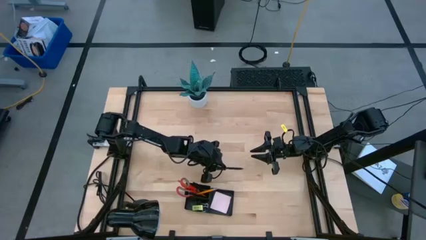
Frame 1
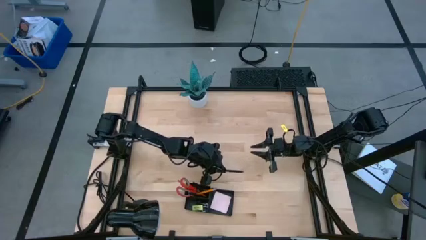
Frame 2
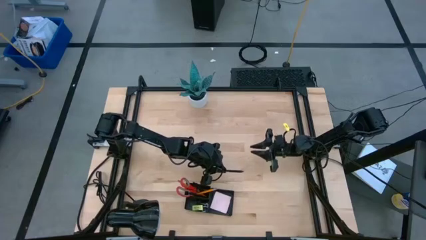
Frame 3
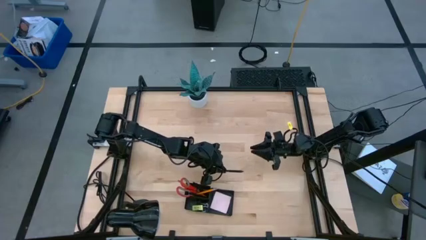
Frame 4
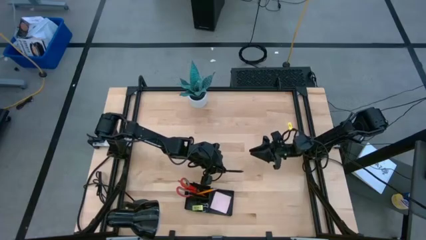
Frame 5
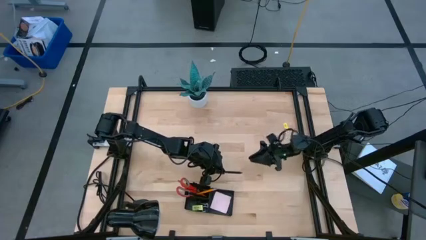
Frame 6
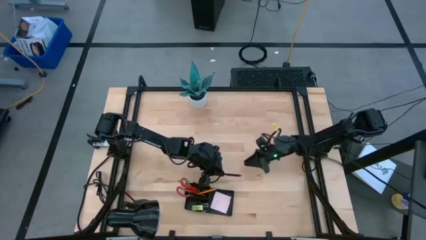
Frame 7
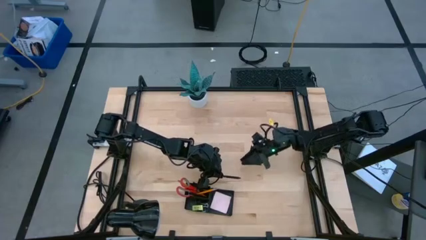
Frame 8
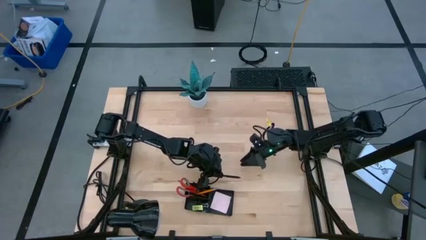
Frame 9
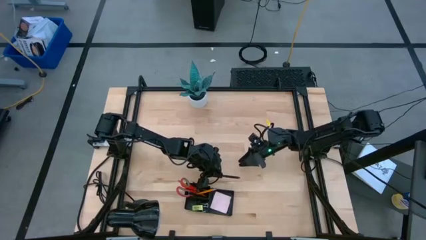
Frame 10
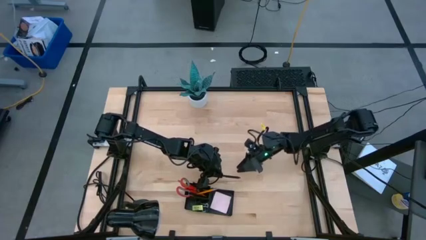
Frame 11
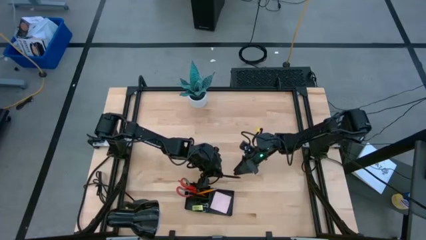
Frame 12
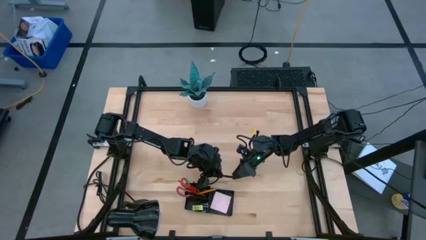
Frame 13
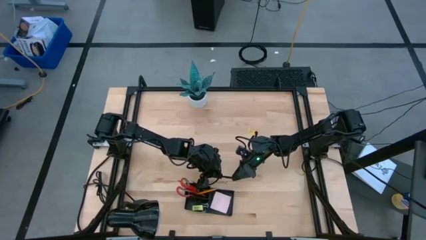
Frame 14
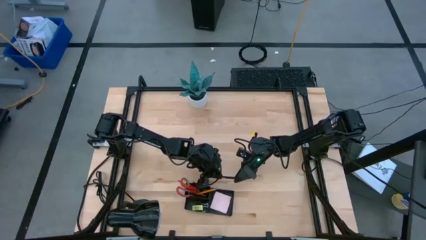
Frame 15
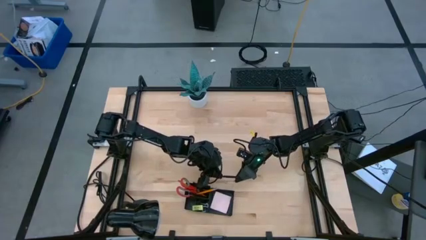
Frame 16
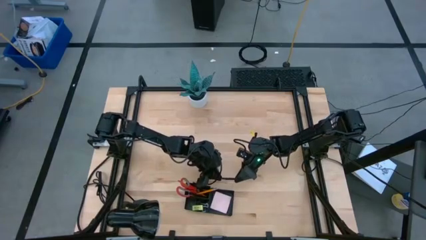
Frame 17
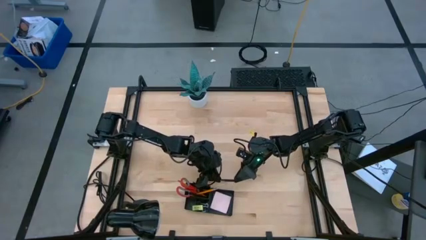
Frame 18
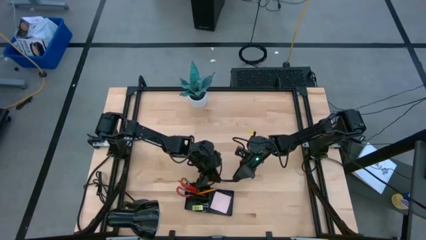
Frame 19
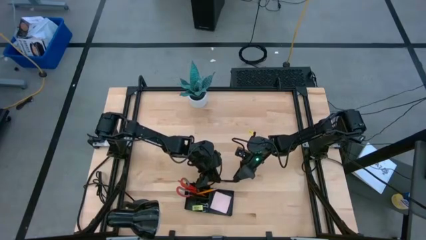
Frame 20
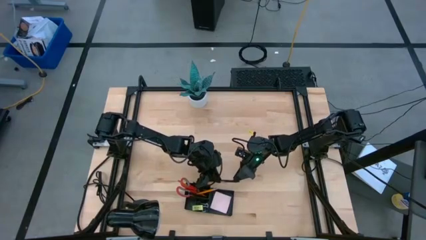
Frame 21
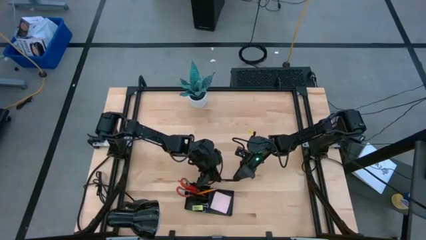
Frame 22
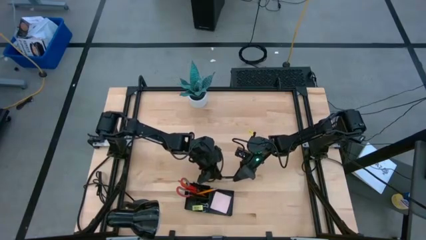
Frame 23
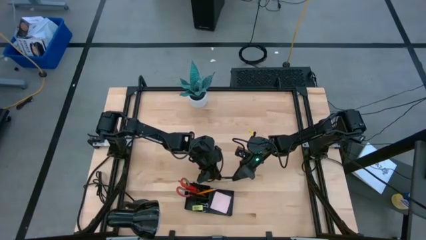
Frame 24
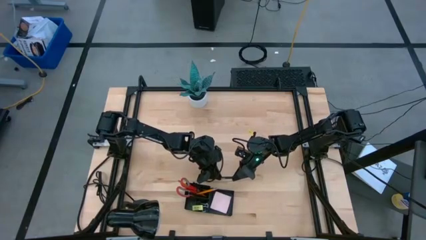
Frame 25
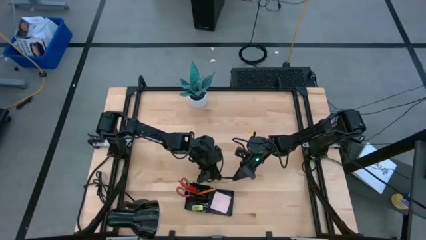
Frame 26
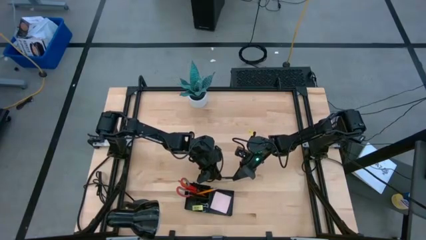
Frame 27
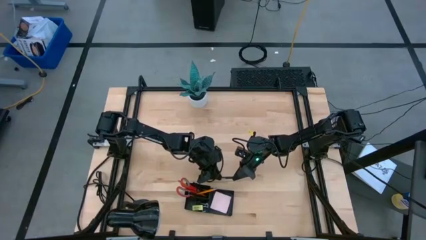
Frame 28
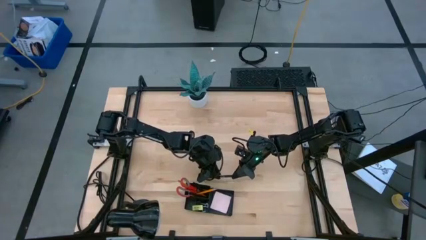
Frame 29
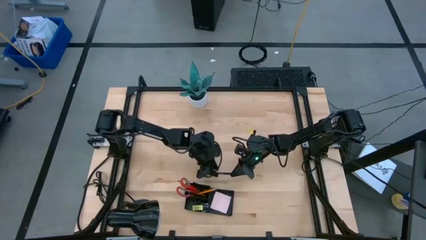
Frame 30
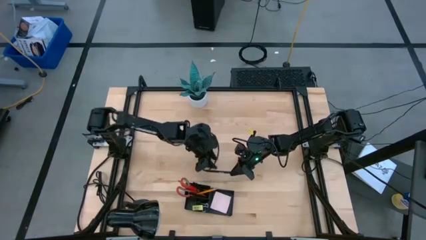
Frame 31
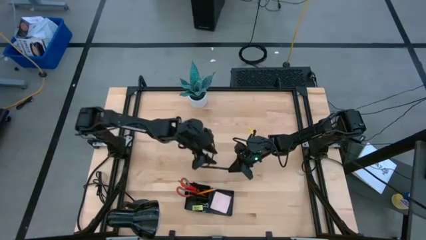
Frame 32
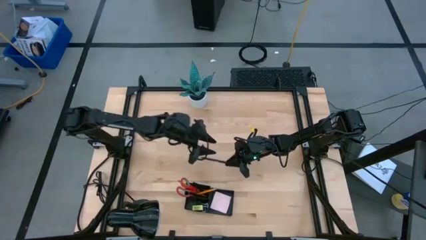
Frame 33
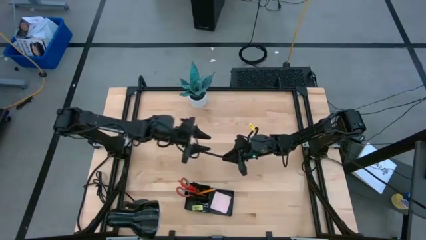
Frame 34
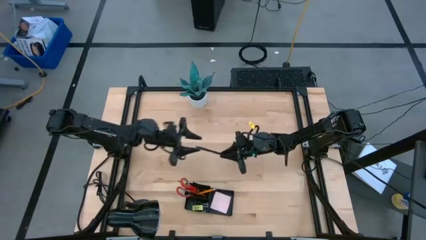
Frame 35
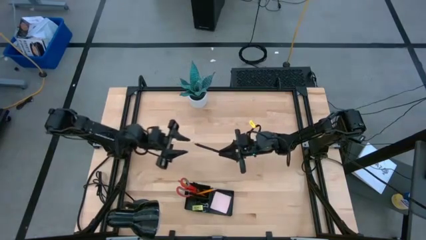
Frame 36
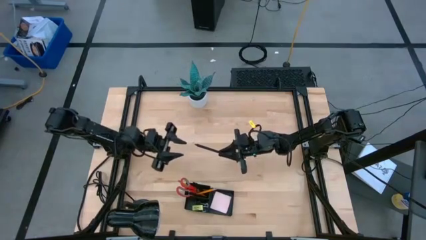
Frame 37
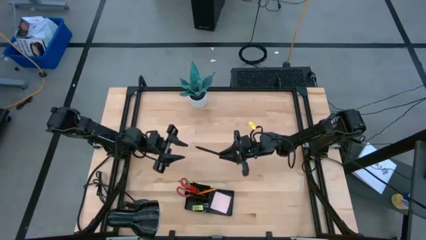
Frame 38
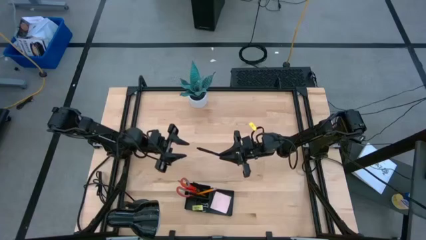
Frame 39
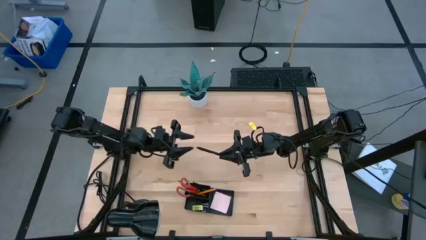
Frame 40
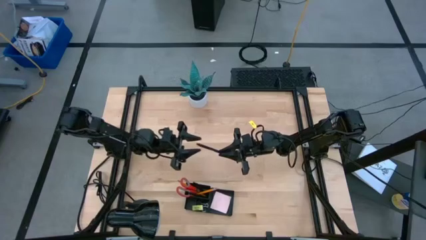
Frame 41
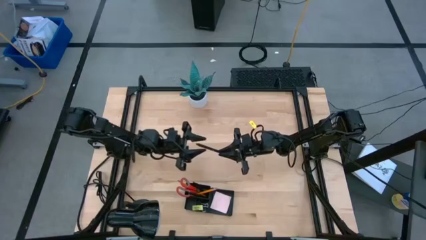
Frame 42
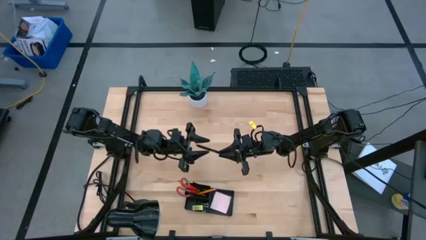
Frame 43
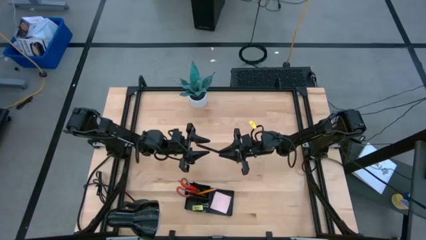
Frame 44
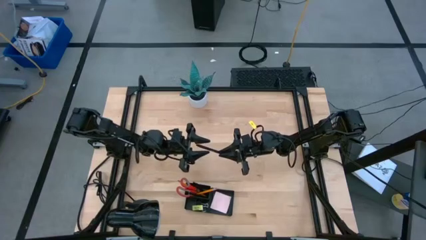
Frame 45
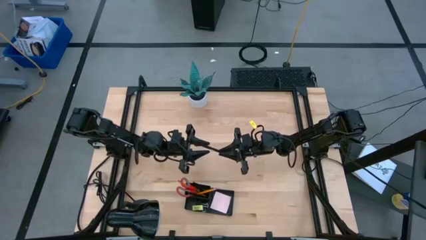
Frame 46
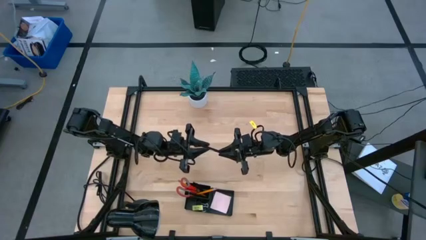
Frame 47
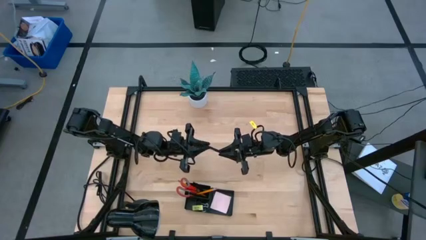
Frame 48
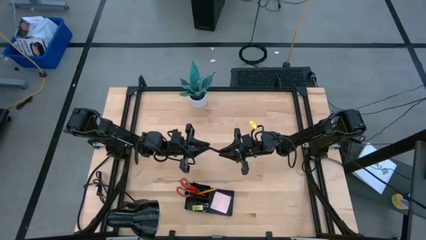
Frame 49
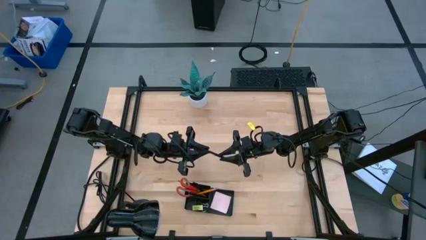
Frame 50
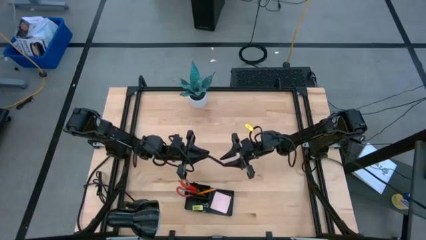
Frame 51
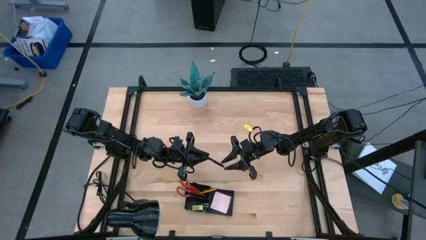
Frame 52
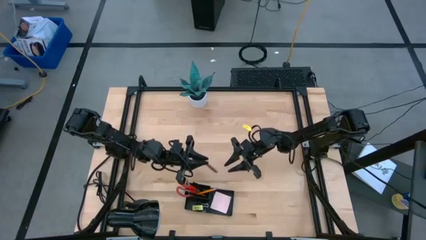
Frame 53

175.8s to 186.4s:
Task: Pick and place office supplies into organizer
Put the black pen into the black desk organizer

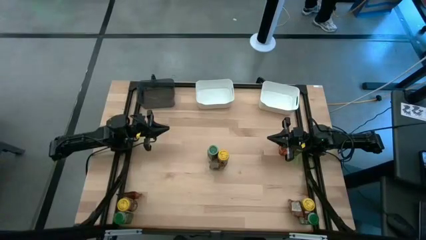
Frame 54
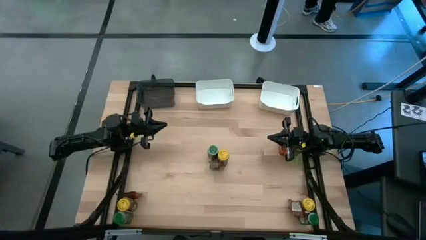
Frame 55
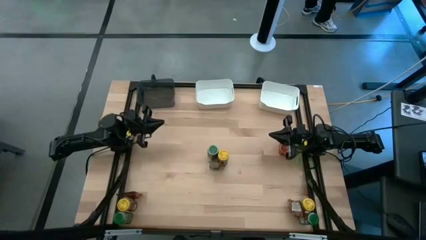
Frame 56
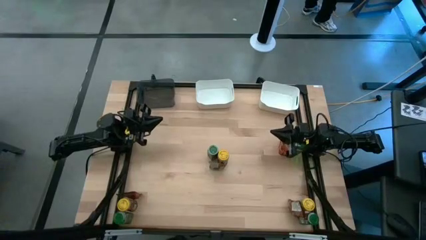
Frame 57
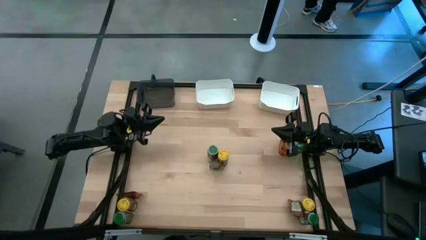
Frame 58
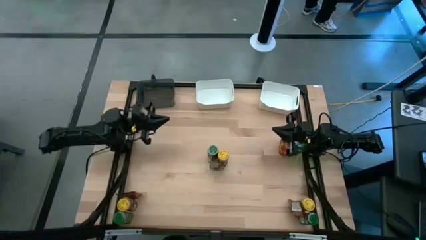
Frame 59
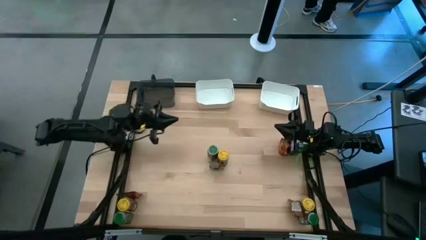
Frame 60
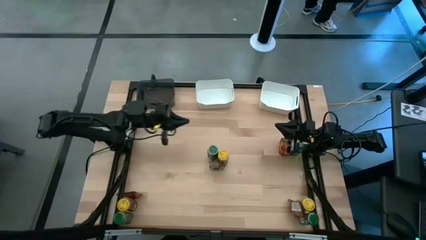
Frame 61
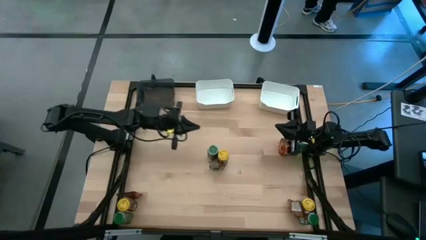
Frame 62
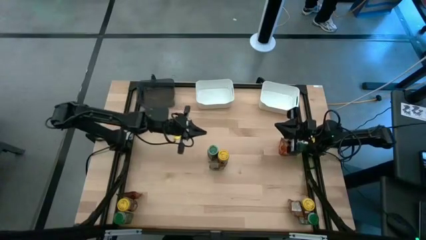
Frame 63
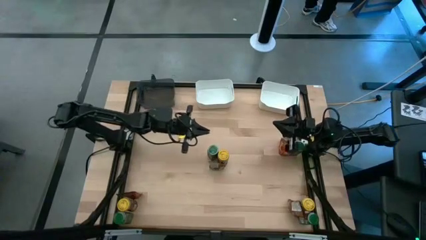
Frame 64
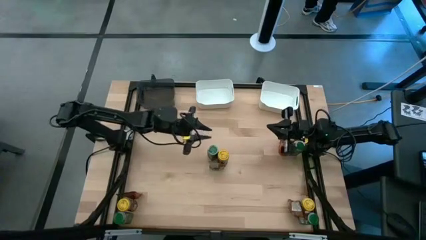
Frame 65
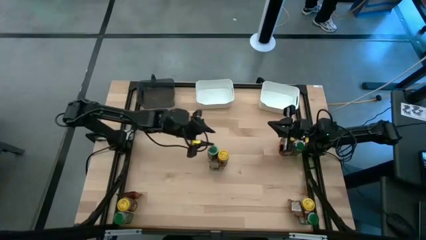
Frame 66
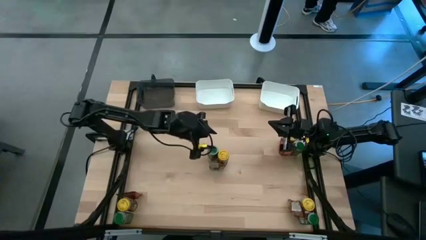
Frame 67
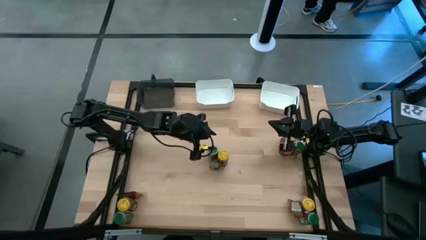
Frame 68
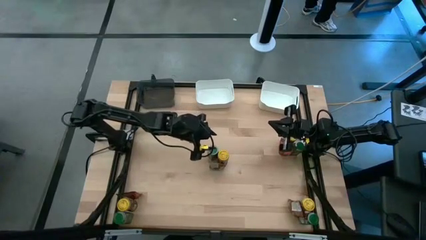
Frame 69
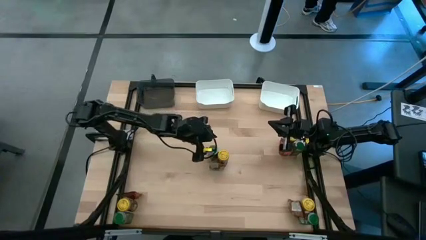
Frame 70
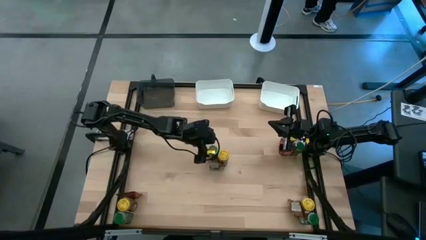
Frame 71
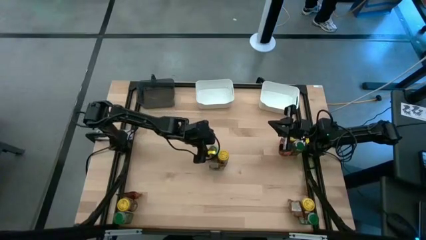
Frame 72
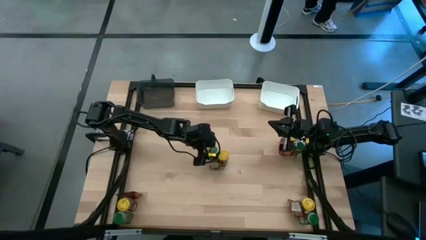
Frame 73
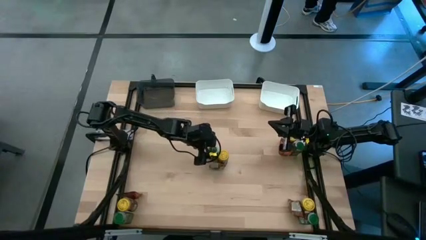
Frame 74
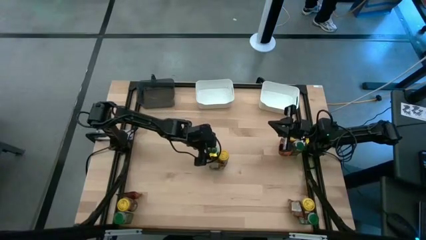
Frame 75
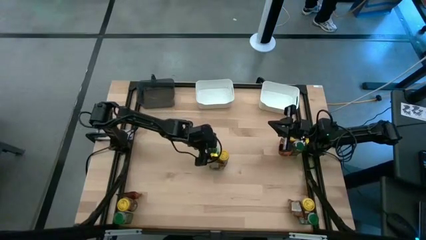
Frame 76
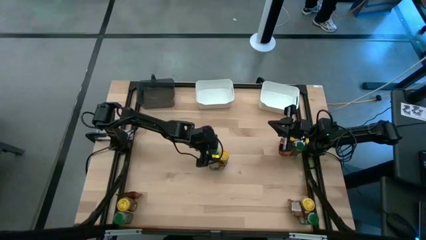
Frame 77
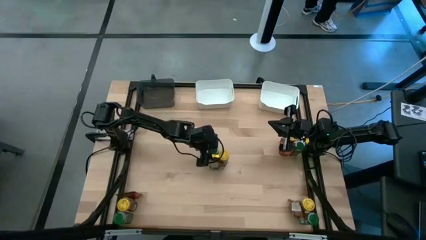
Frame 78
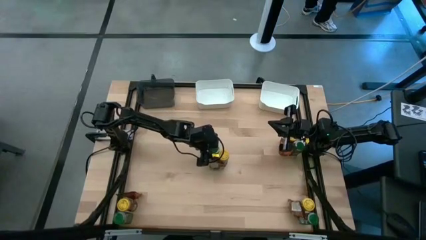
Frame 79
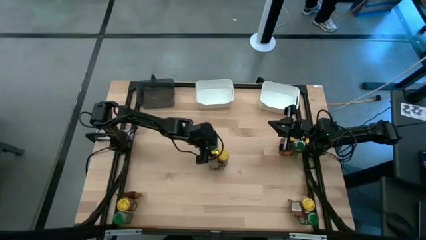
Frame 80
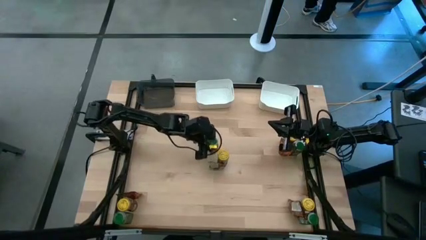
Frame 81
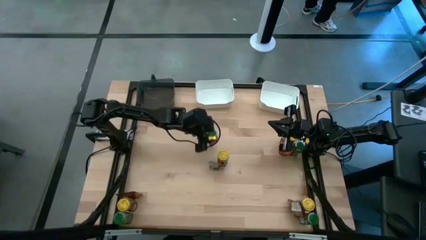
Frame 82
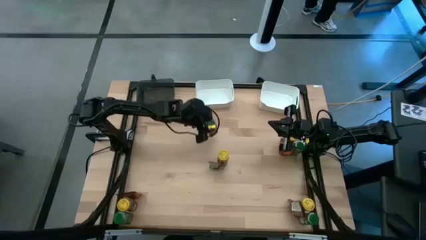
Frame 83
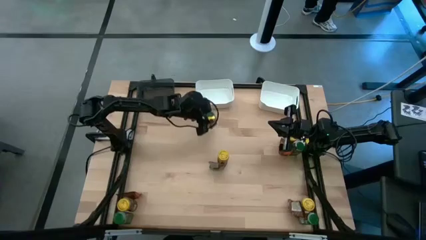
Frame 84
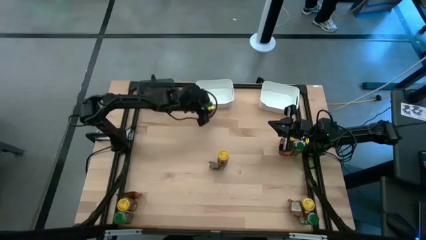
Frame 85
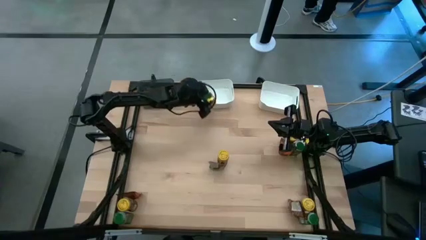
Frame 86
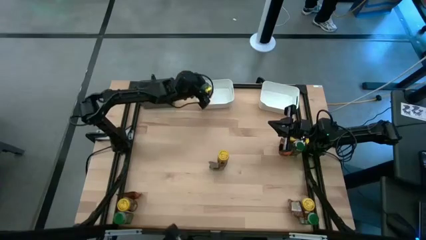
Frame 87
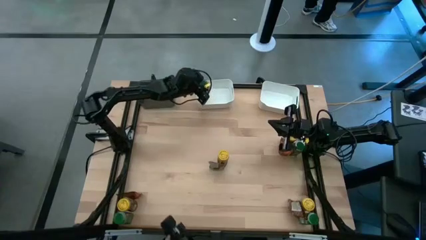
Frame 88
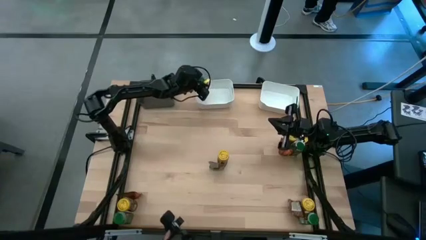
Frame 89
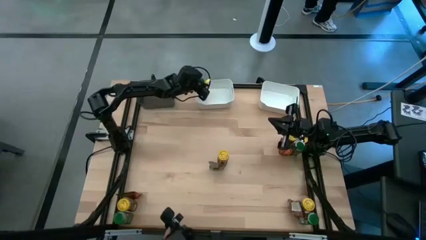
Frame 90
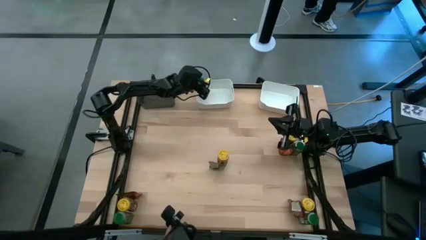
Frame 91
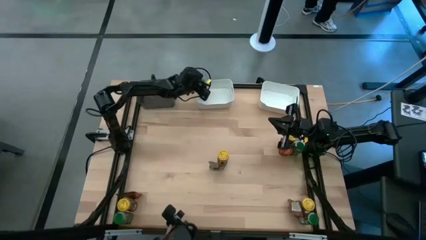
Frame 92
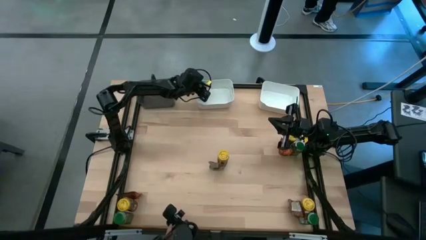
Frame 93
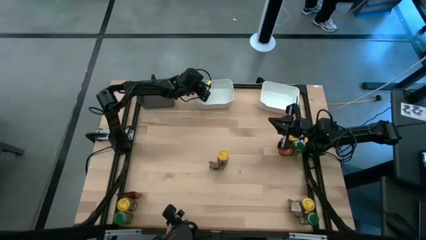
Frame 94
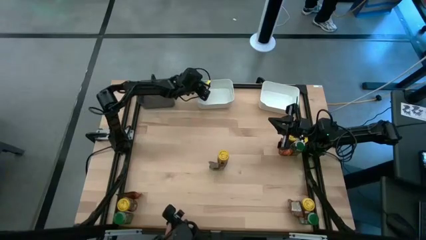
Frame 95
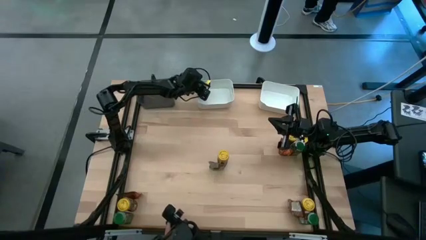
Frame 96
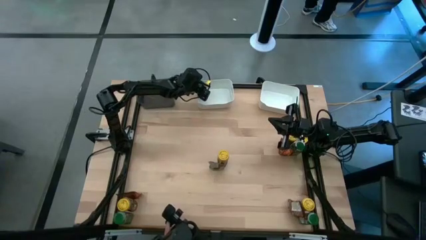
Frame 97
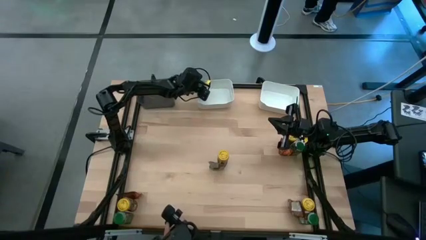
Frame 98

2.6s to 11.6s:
Task: Sort spices by type
Put the center green seaasonig bottle into the left white bin
